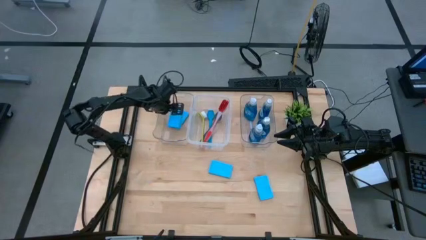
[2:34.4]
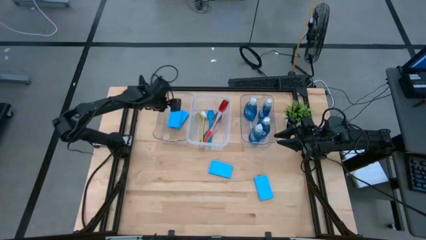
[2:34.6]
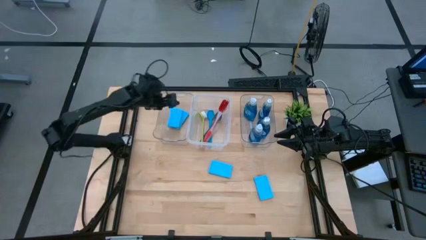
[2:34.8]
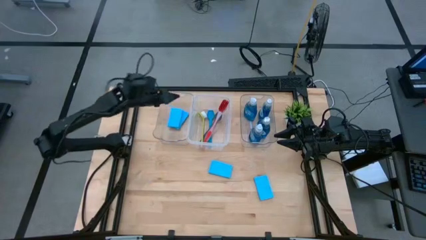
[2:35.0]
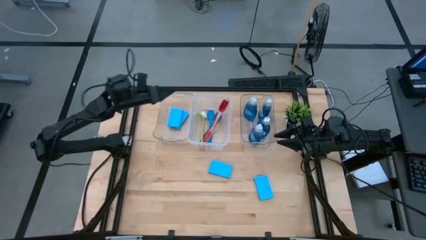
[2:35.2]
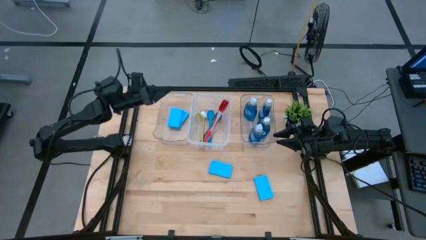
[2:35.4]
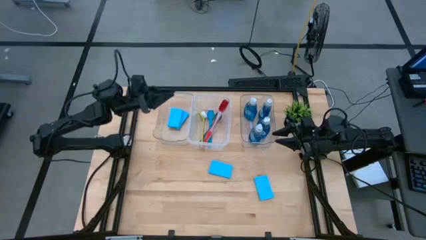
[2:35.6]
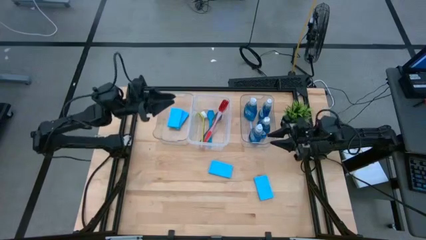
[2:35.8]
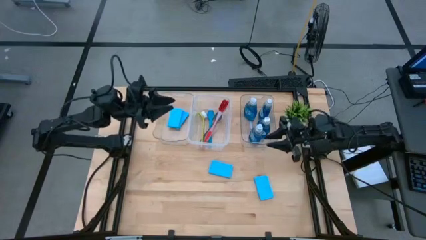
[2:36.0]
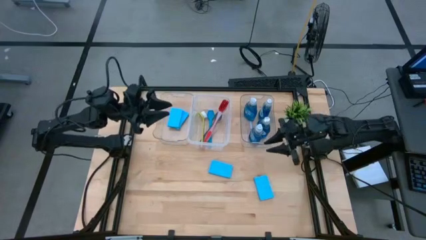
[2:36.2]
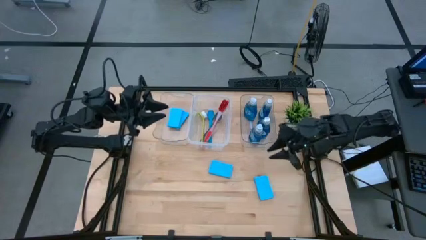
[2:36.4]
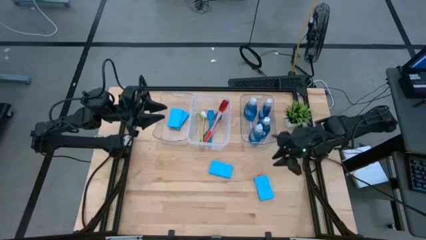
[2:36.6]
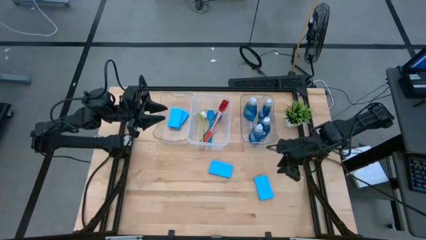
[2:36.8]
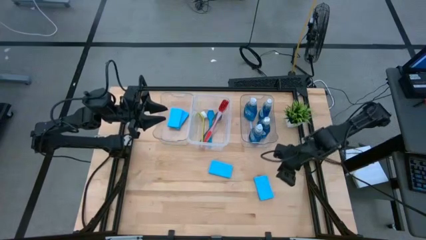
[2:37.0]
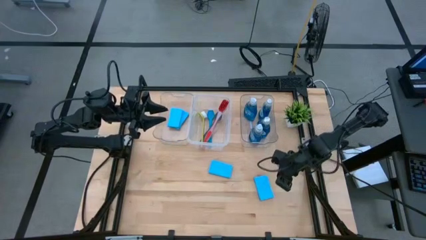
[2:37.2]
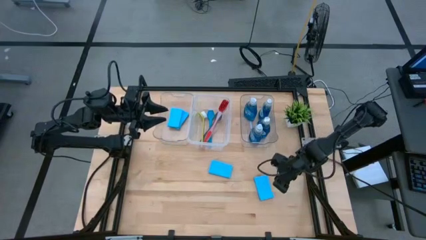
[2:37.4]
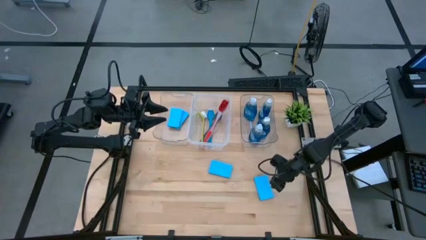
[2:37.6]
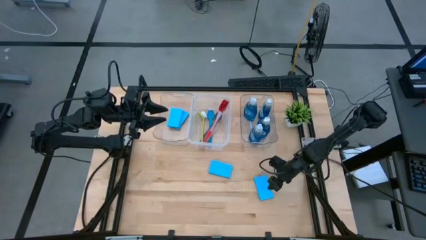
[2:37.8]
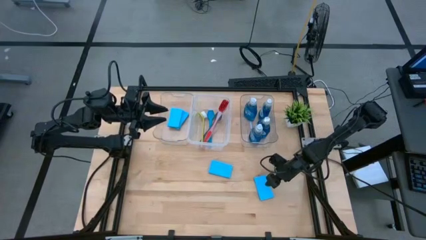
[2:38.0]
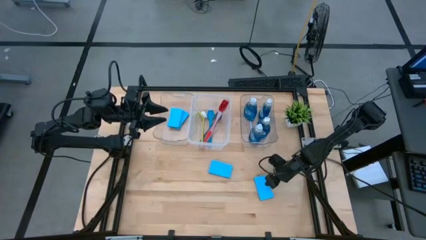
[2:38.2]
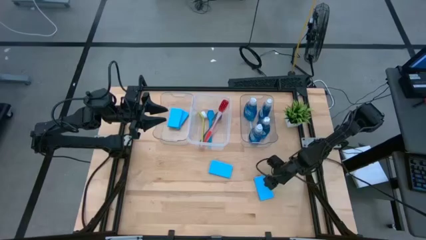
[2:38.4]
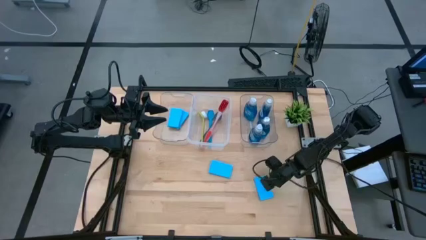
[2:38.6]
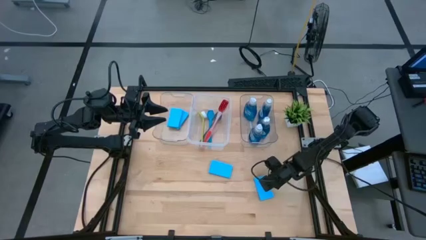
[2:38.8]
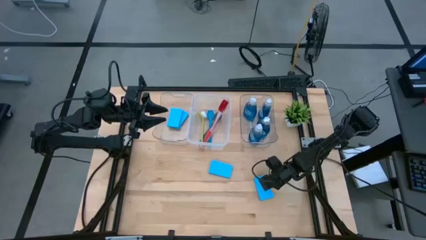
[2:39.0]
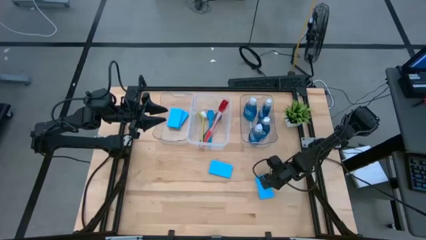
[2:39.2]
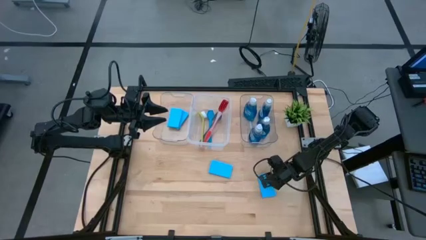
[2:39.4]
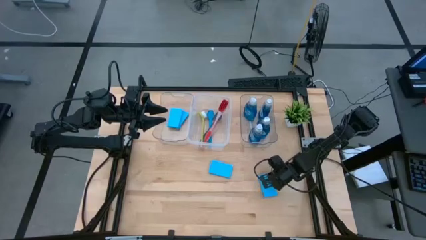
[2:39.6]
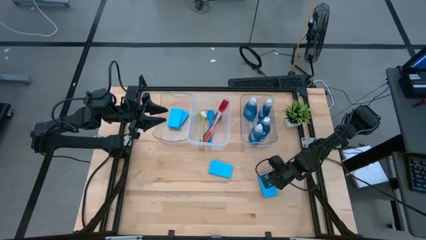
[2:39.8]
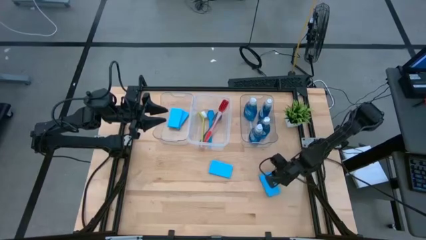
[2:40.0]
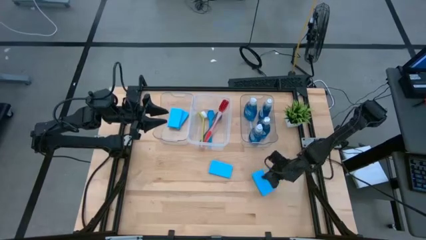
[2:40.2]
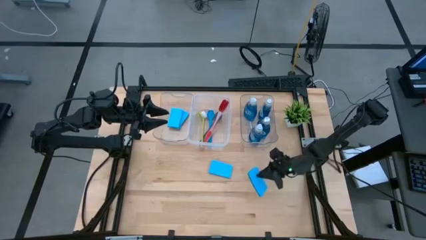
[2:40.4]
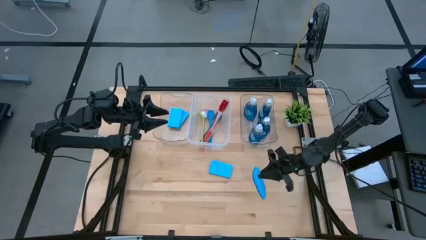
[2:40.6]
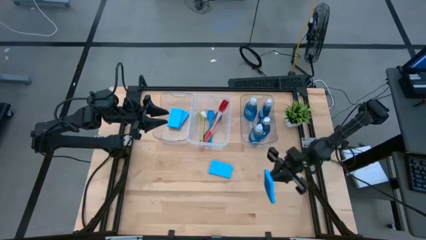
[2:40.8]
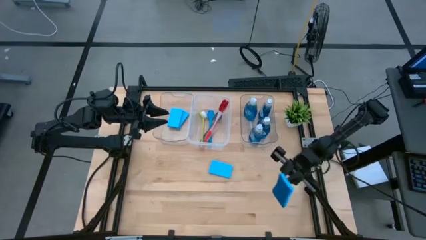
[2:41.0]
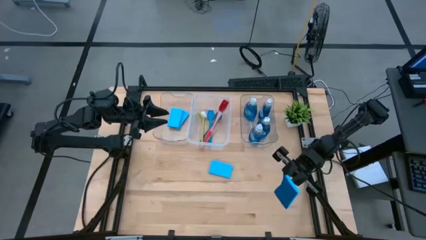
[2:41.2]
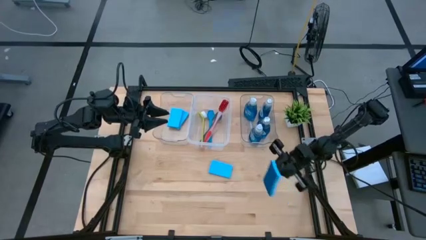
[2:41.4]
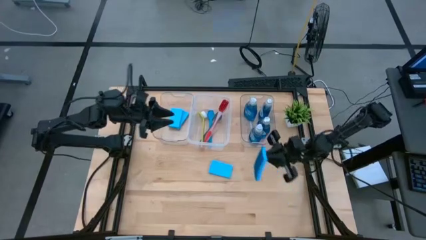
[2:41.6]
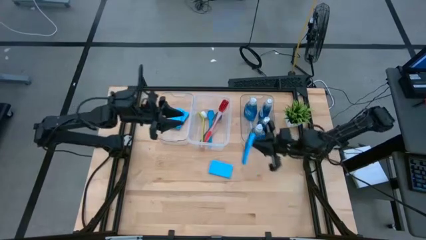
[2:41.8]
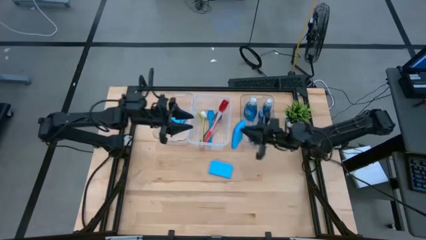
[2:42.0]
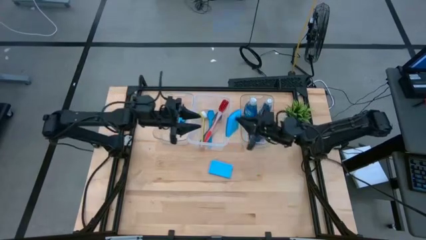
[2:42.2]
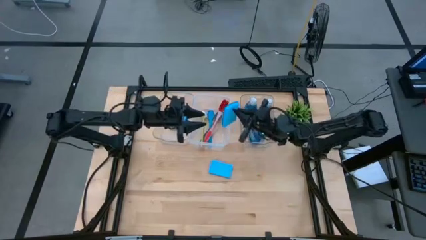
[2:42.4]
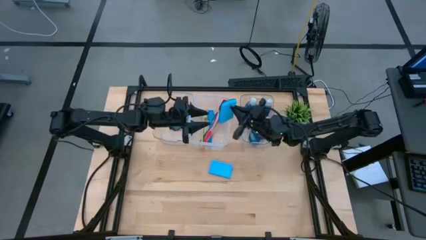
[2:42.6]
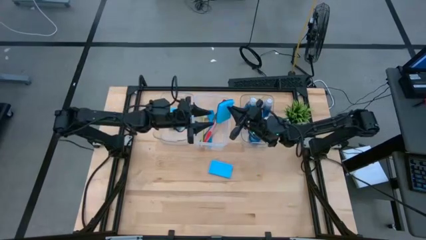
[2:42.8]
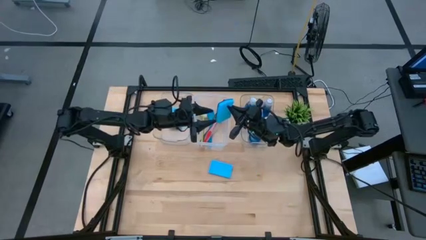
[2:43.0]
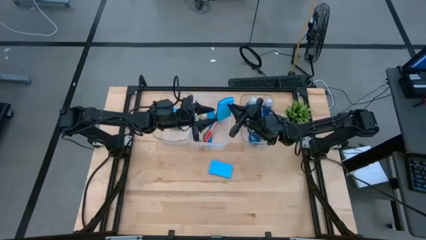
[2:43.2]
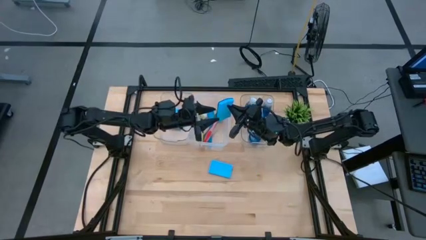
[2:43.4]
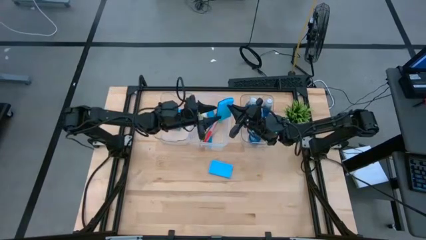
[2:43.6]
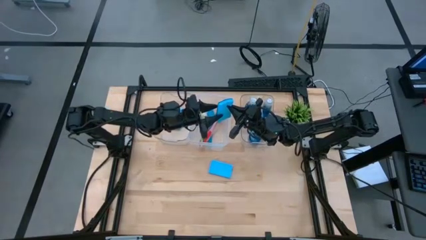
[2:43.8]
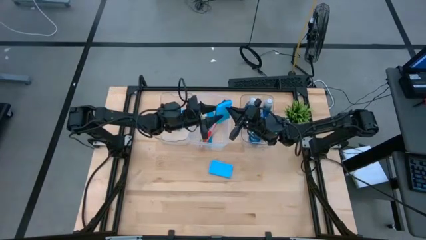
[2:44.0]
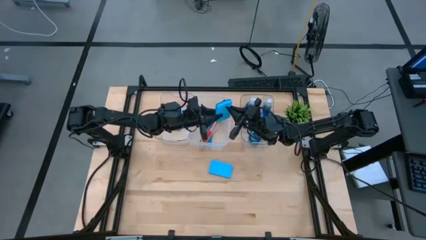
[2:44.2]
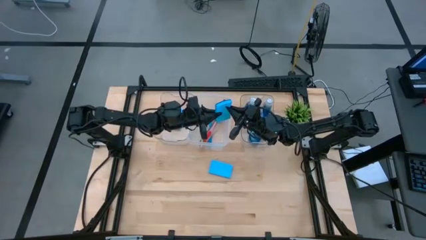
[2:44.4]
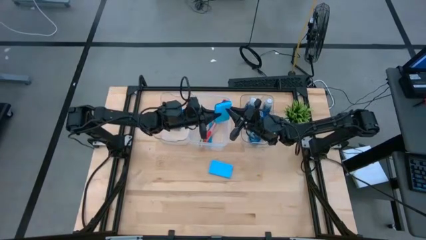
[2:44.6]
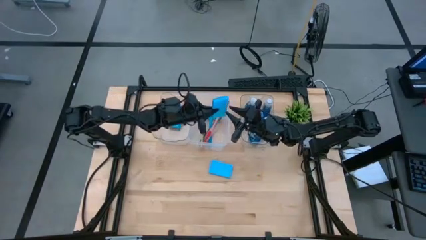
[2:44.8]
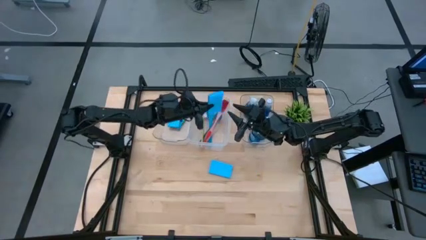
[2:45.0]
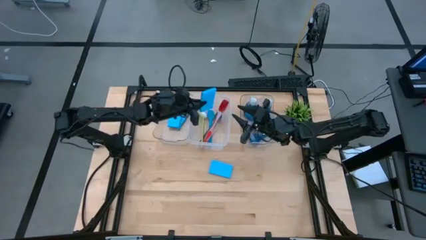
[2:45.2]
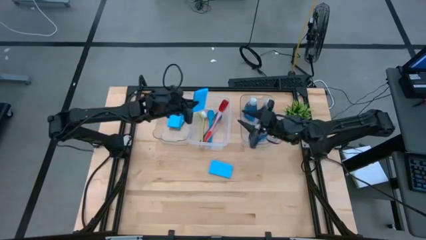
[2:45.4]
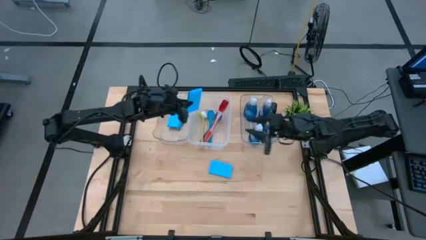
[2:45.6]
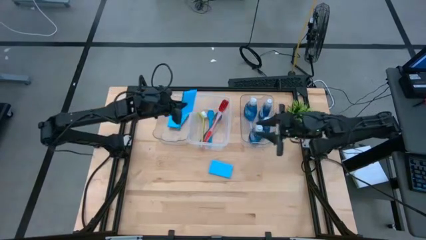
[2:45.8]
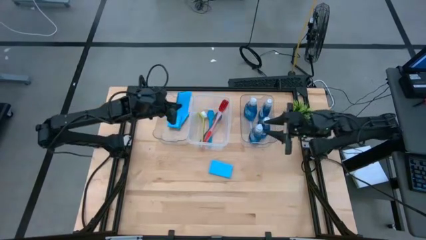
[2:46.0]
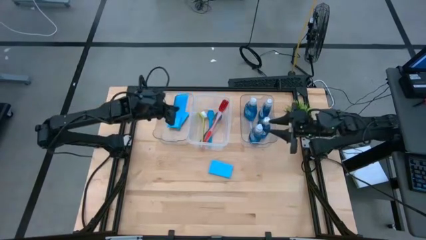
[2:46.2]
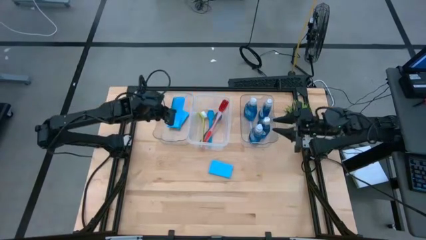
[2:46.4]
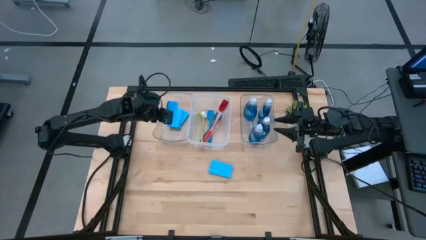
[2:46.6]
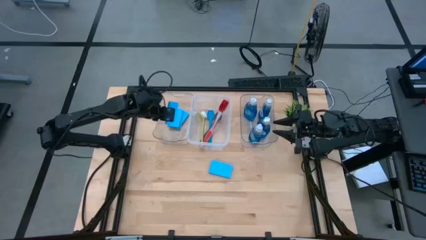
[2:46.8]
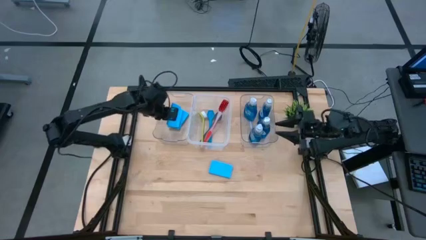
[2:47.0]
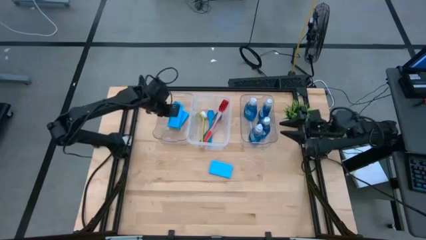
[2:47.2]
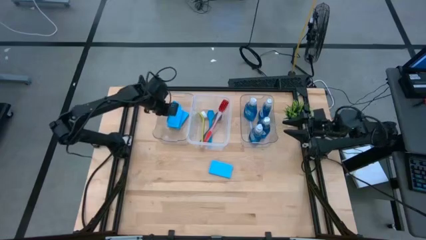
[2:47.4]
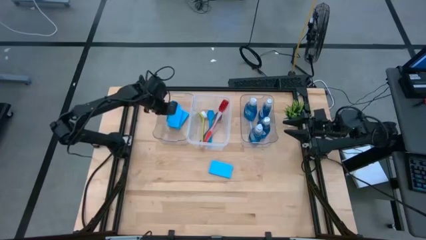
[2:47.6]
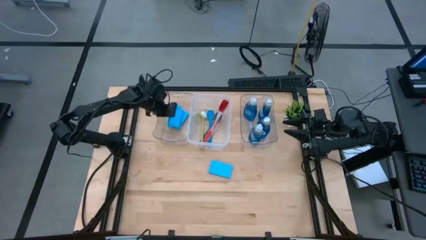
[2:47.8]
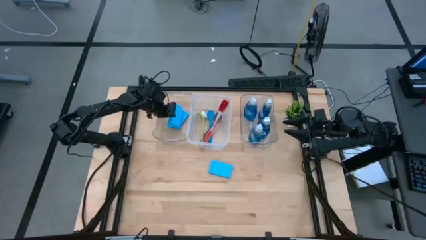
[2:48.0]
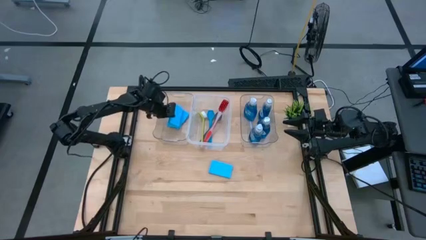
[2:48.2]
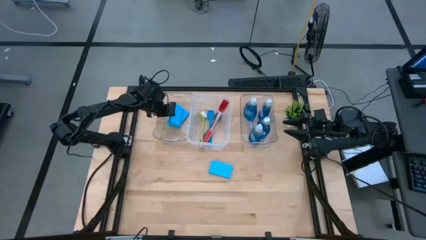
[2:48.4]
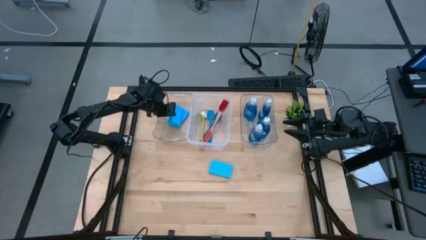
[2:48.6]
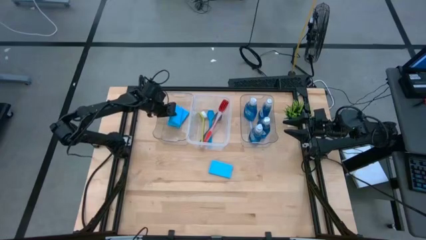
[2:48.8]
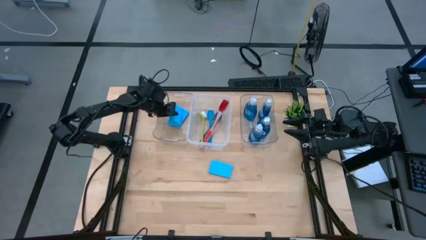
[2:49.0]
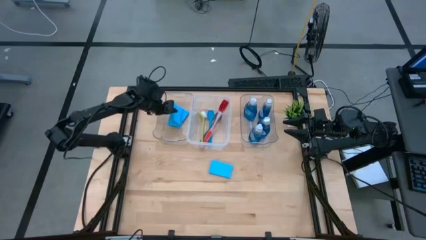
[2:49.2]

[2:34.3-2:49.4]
Task: Pick & Place Kitchen Sink Supplies
Put the sponge into the left transparent bin
